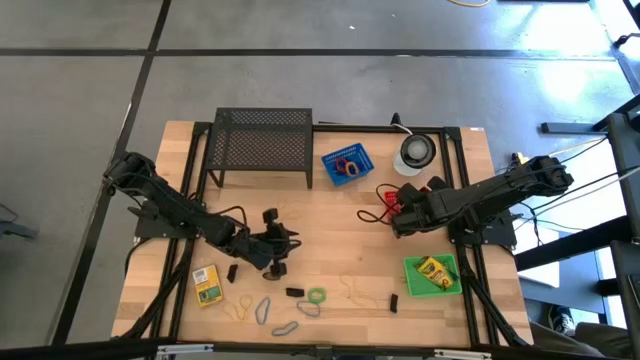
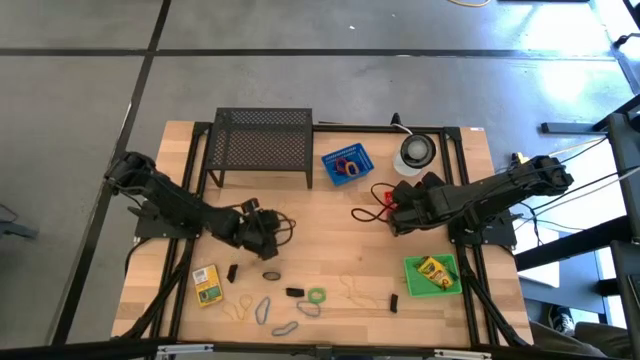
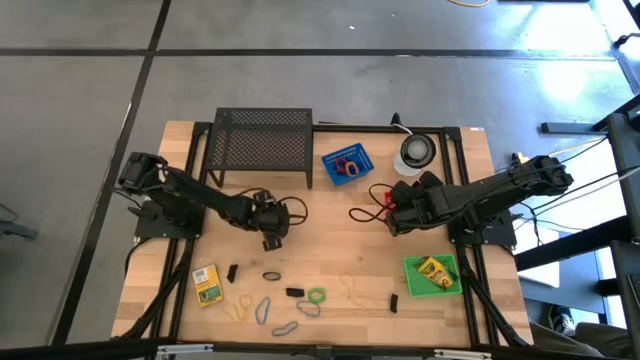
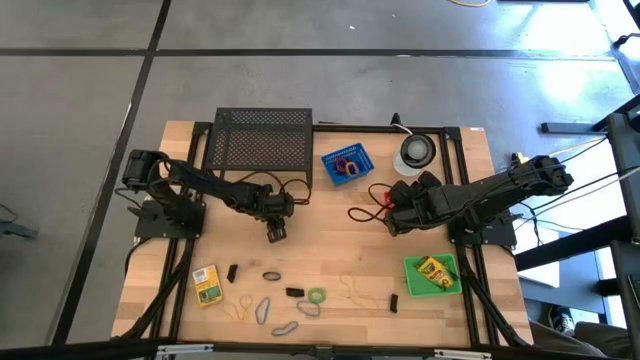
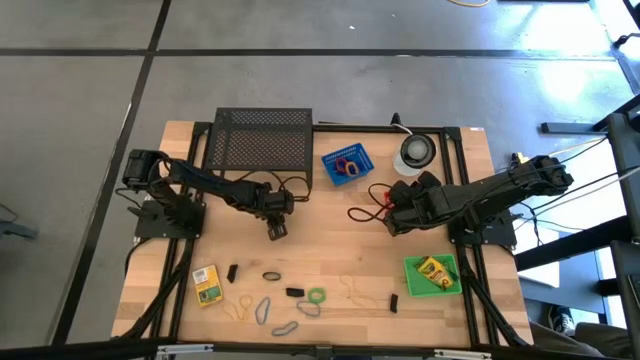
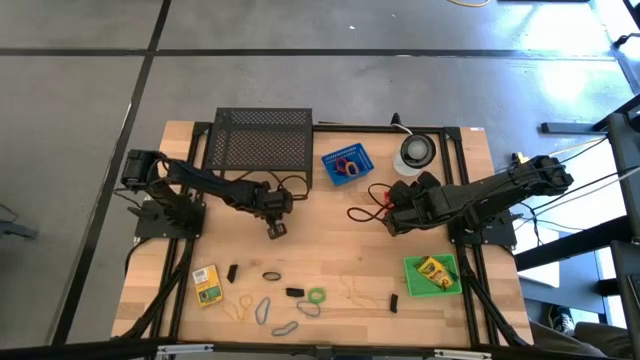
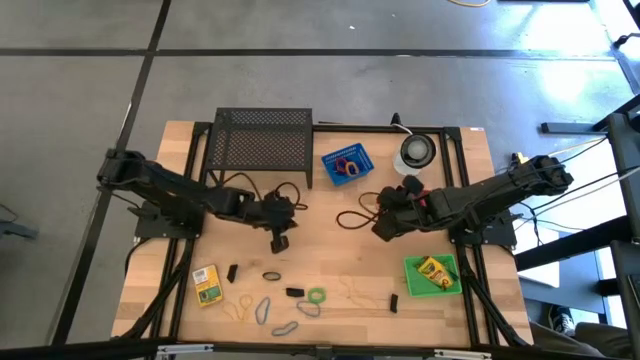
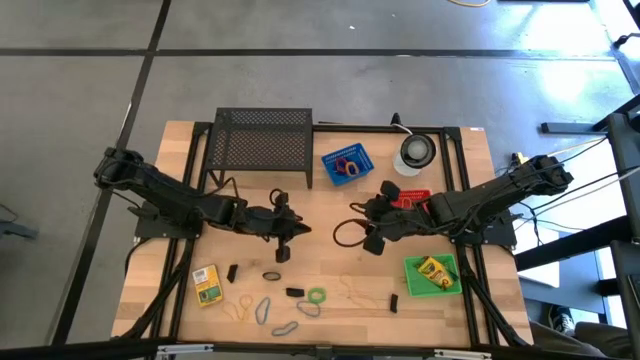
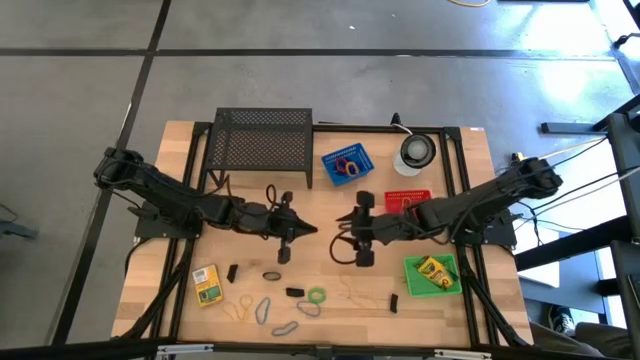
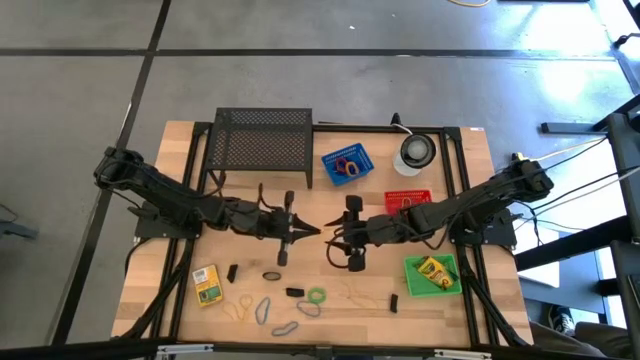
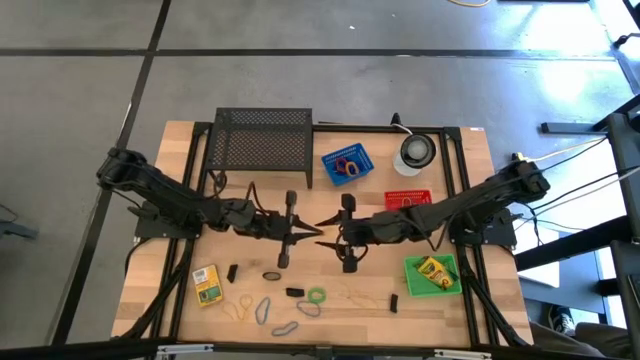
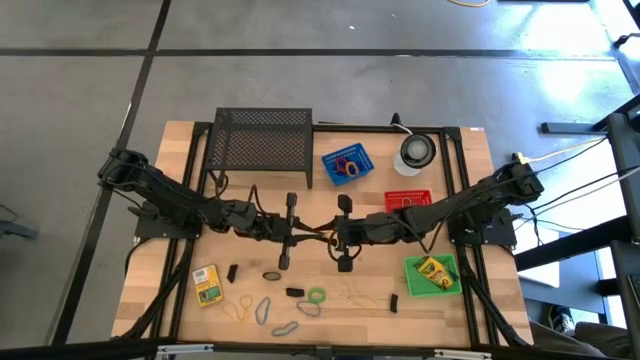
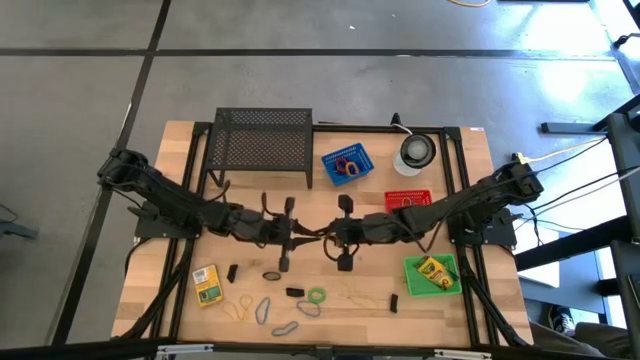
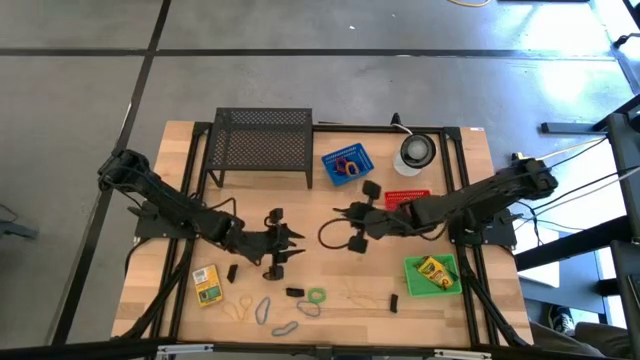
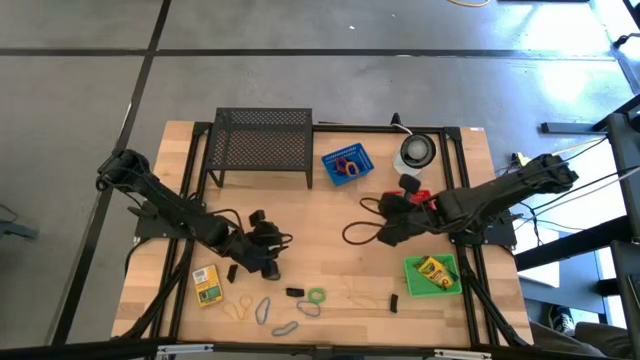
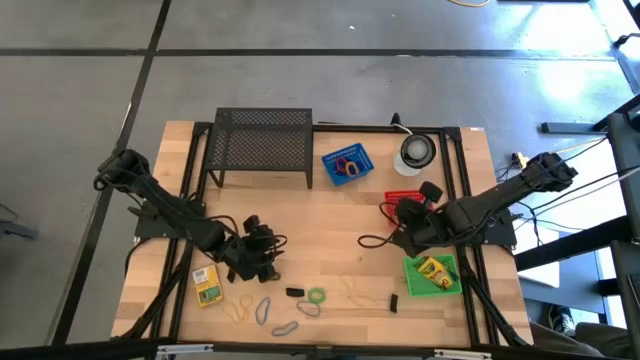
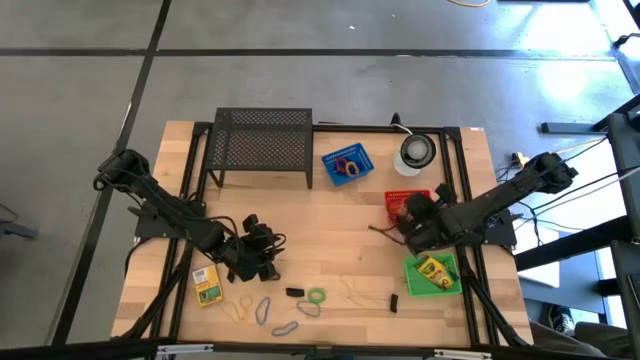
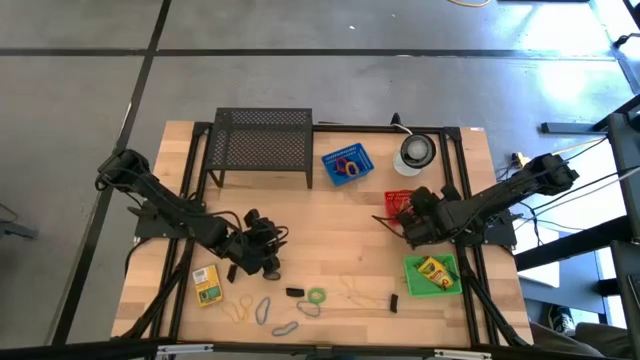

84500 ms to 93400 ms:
Task: Pick & Place Office Desk Supplies
Put the yellow rubber band into the red bin

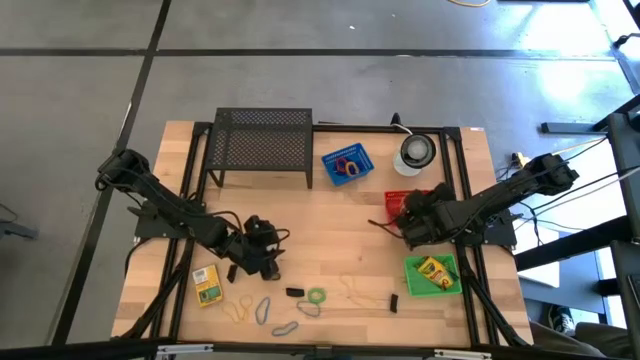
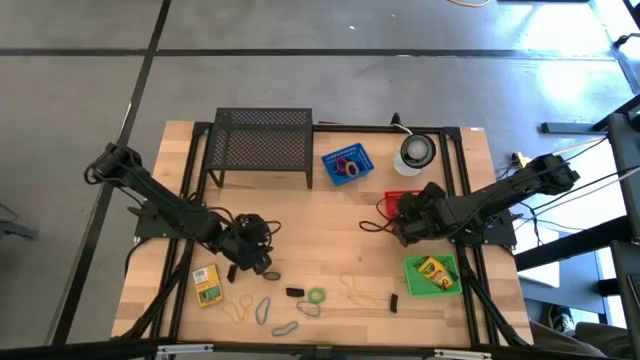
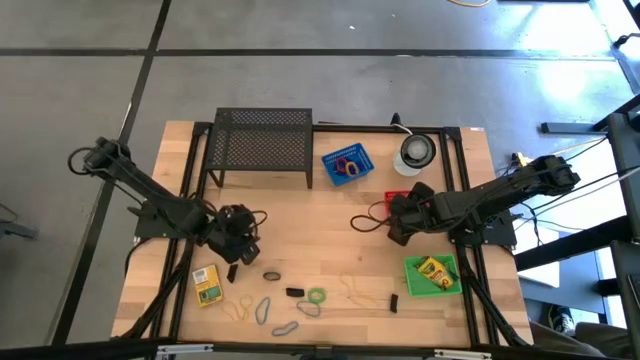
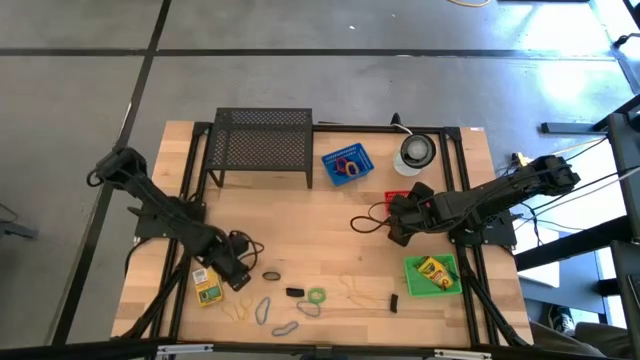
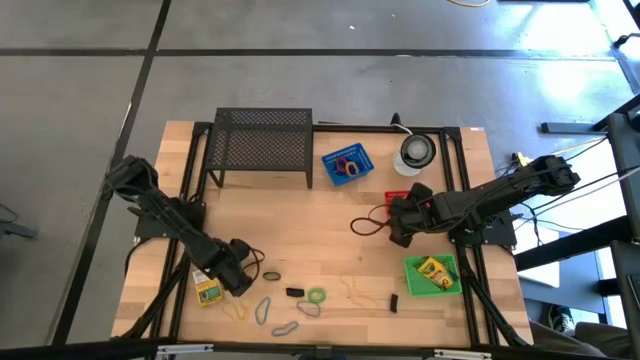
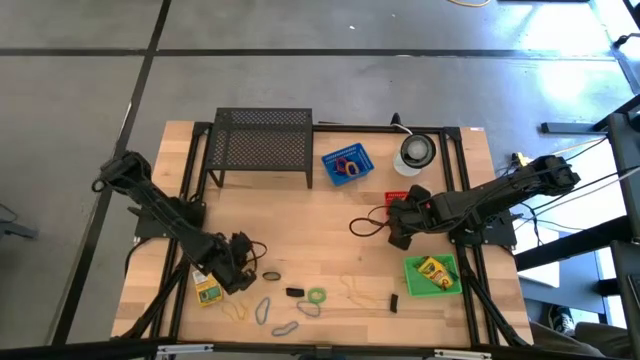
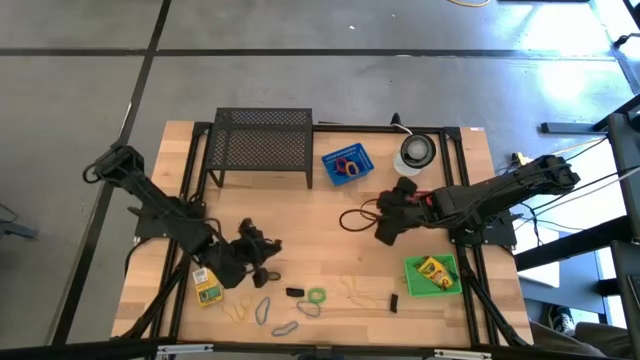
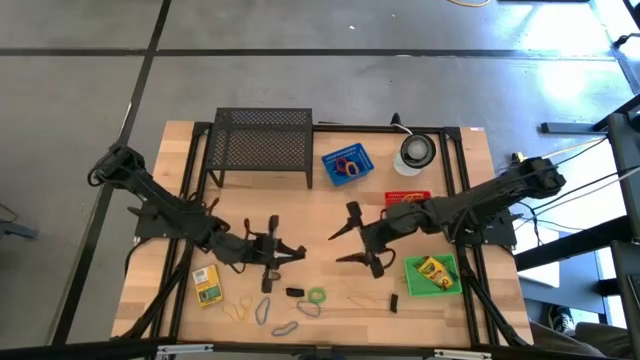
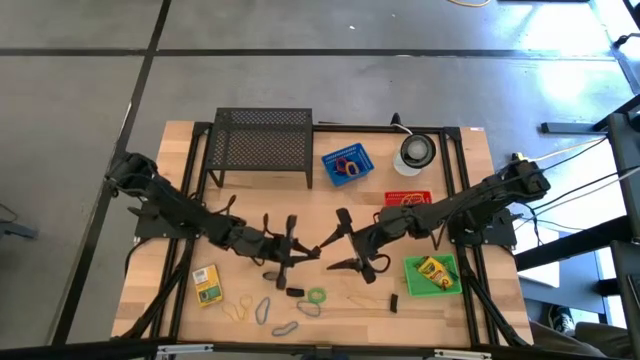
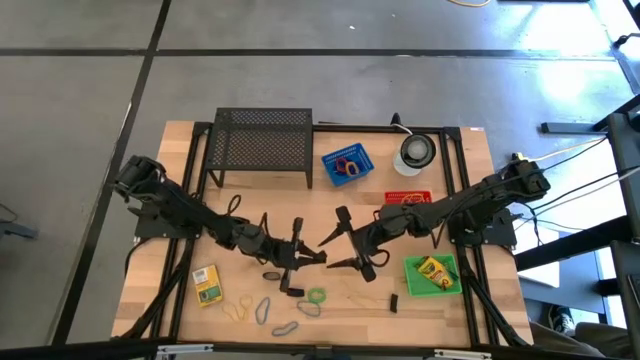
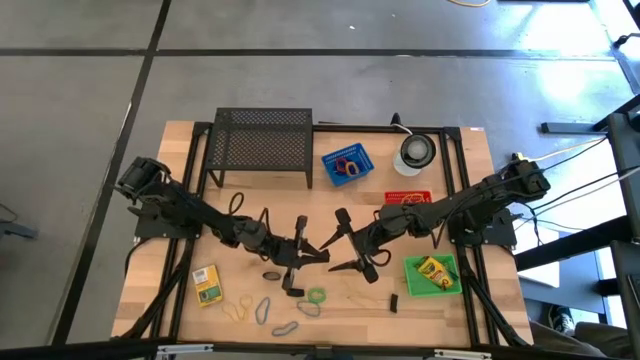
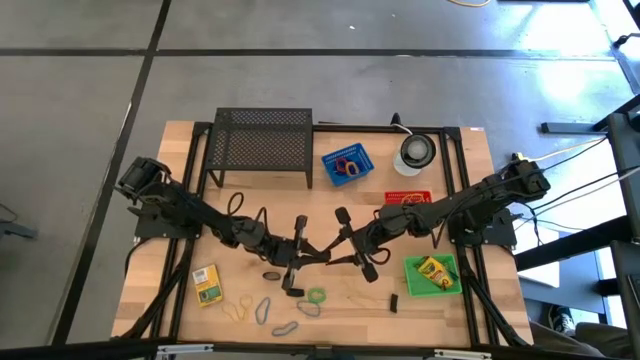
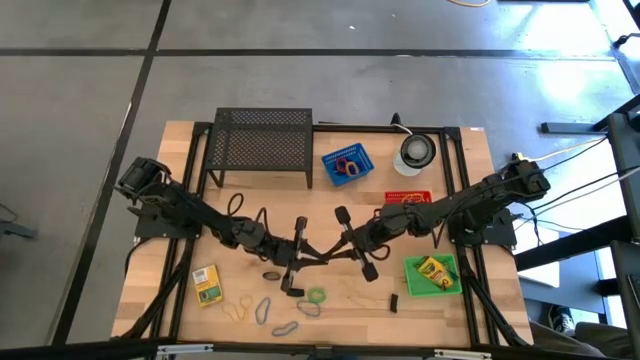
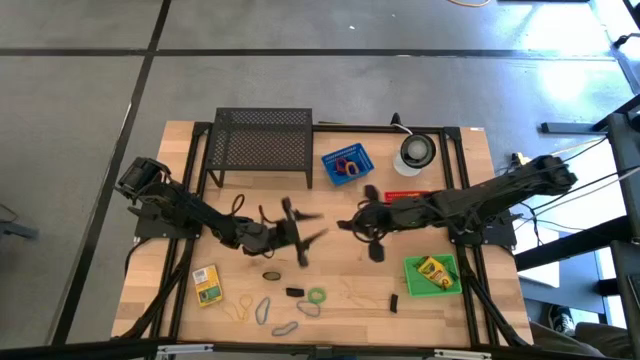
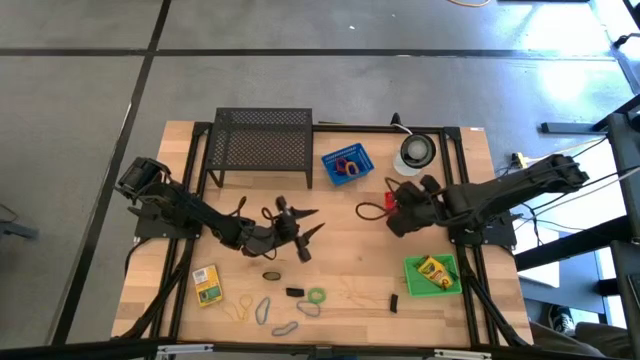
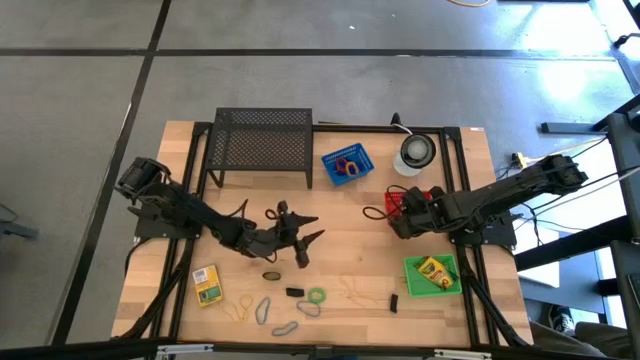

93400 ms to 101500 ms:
Put the black arm band into the red bin

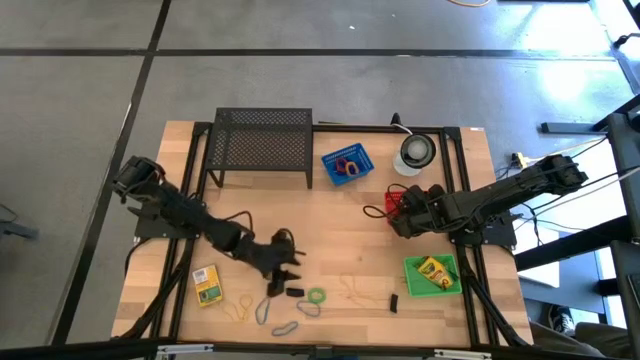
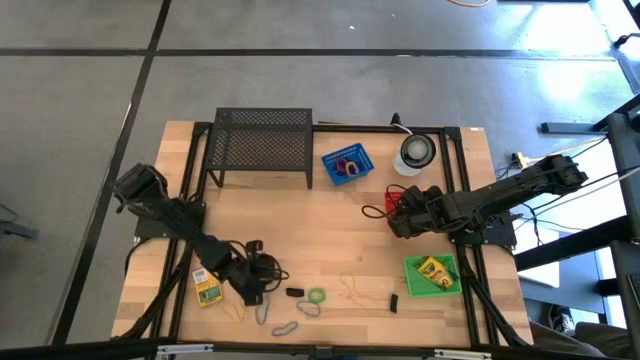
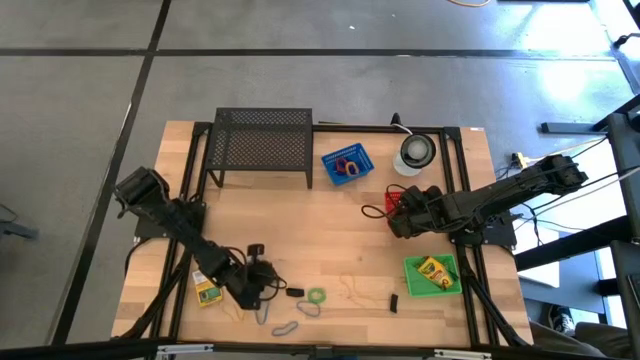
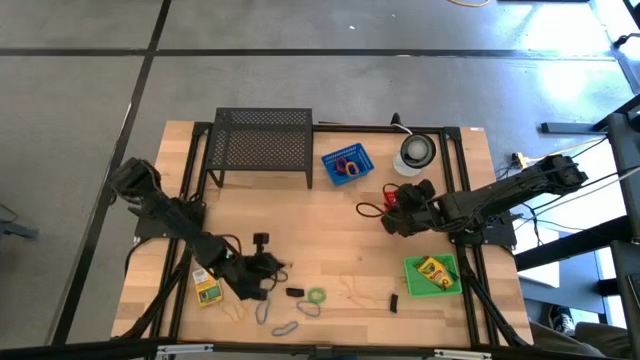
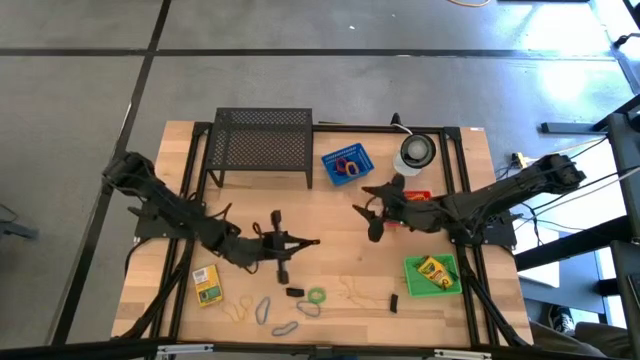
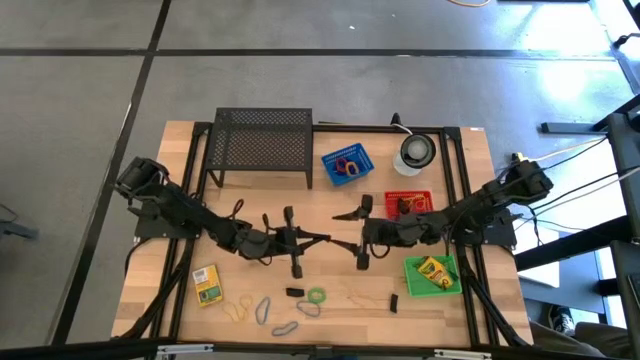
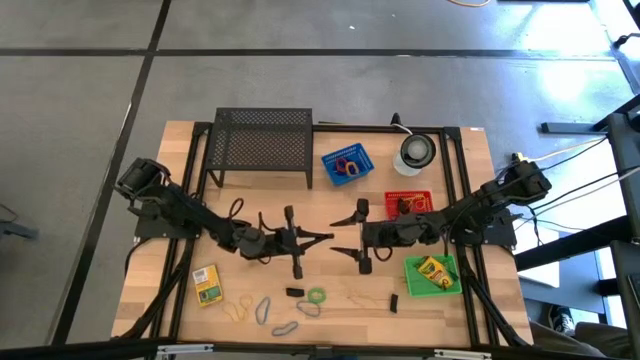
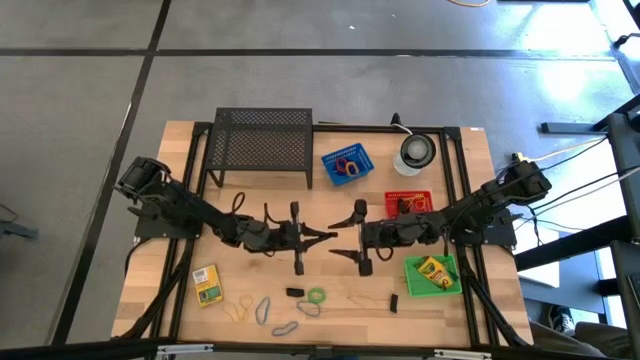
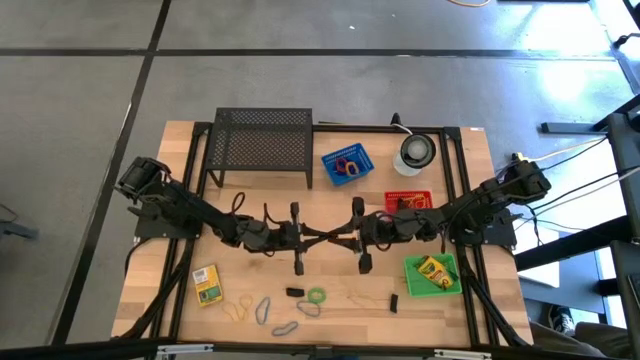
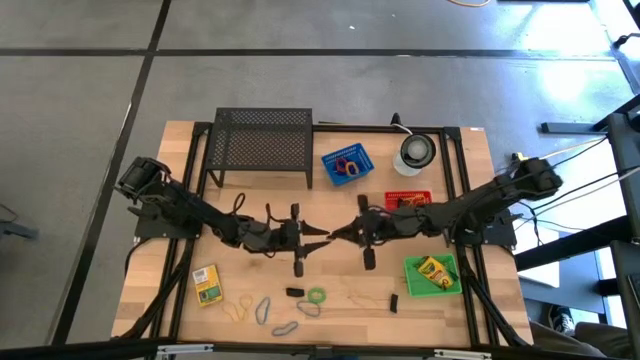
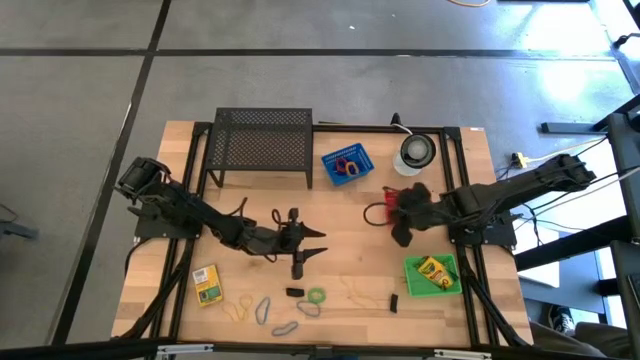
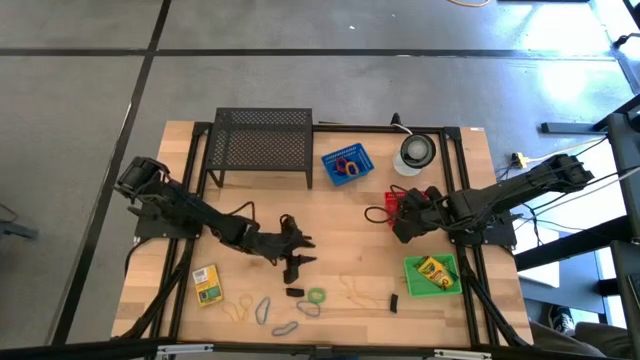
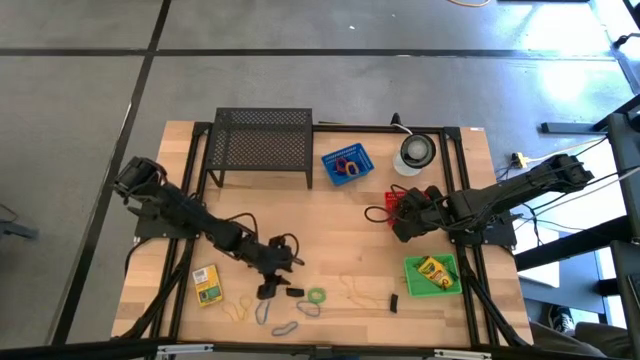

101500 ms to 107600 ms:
Put the black arm band into the red bin
